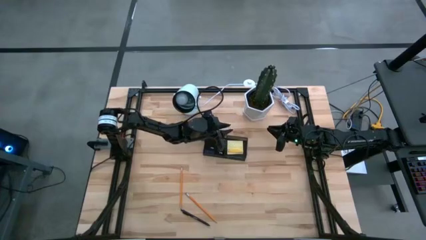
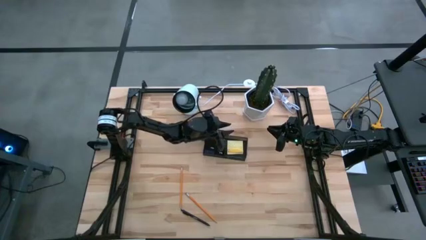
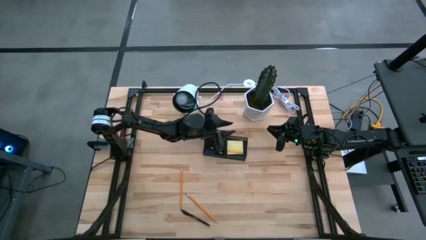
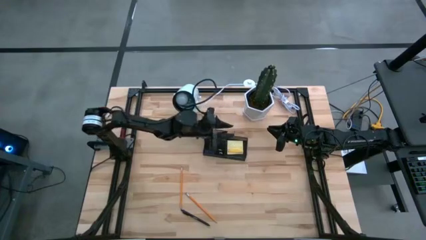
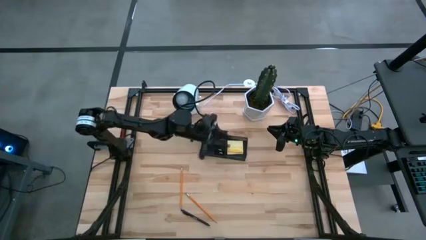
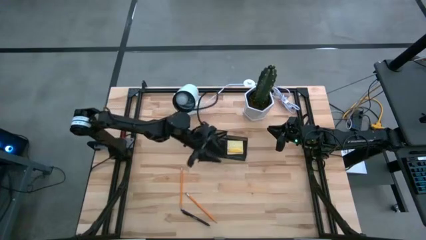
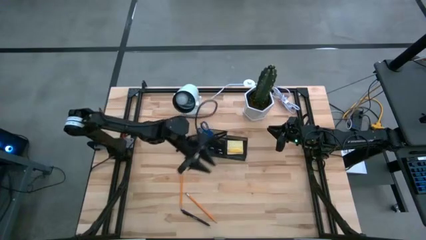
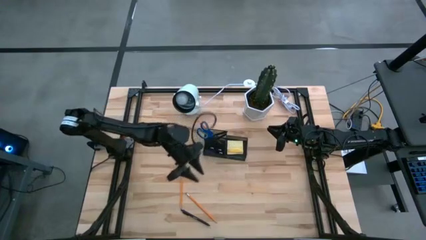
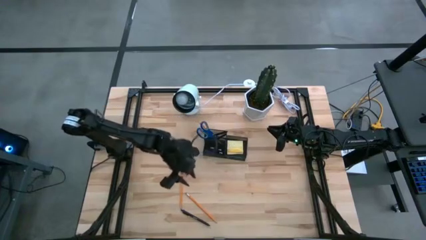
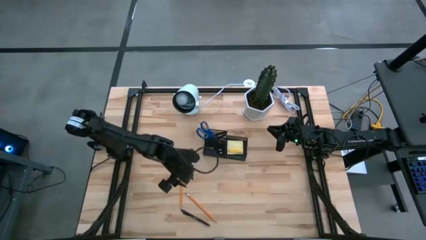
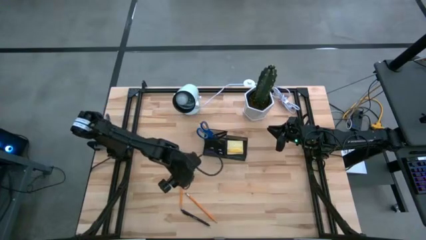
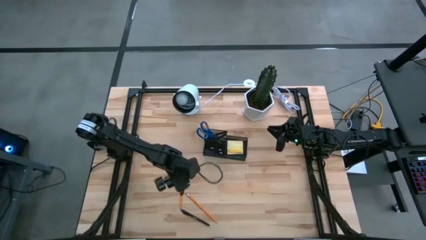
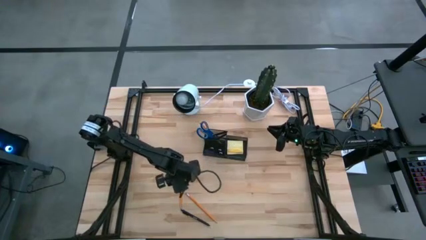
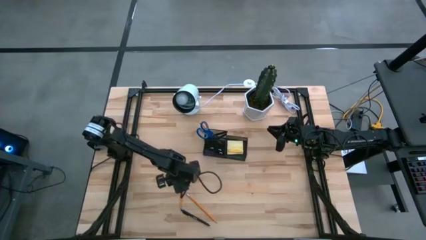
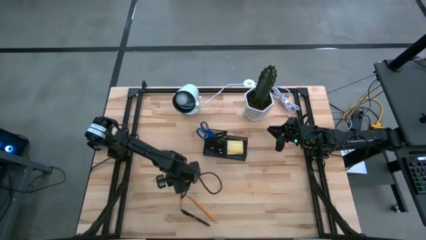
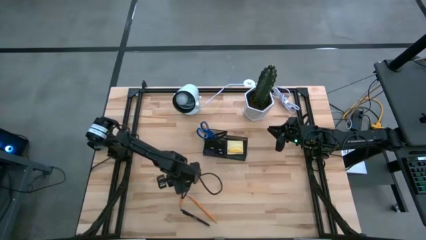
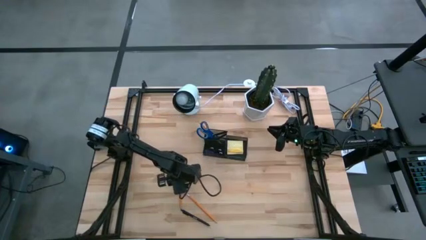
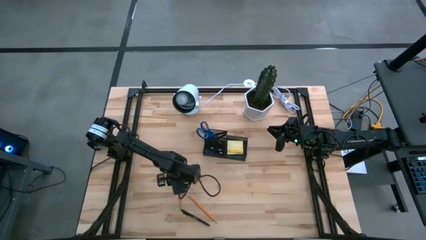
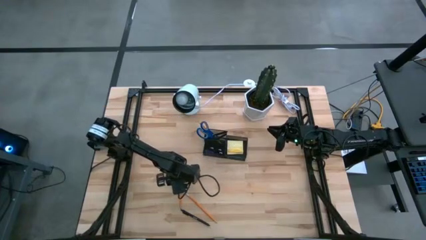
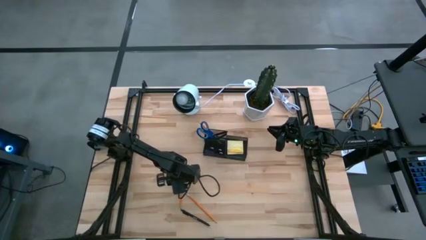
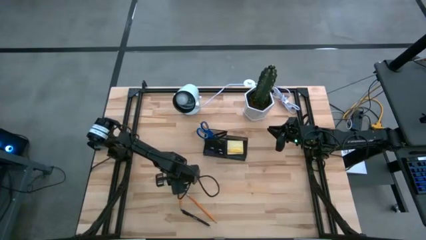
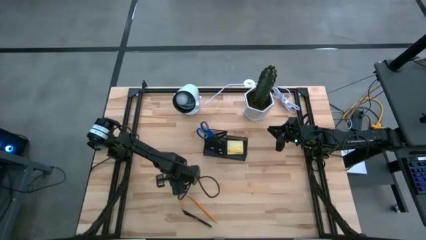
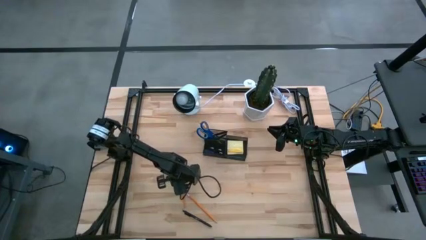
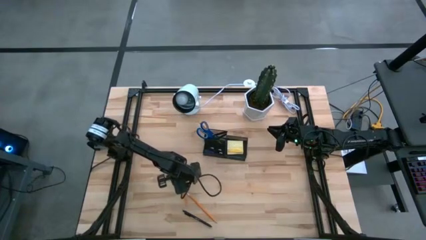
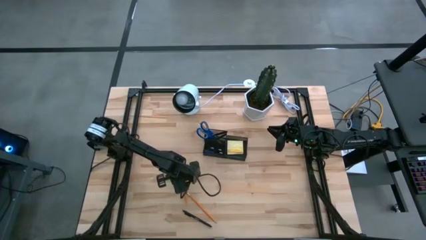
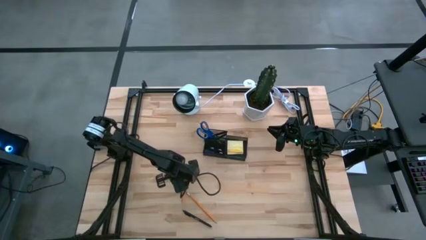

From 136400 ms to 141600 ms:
Task: Pick and place office supplies into organizer
Put the left yellow pencil into the black desk organizer

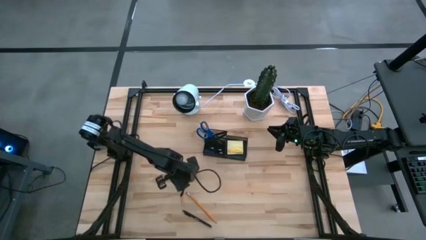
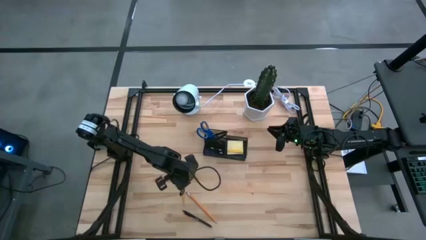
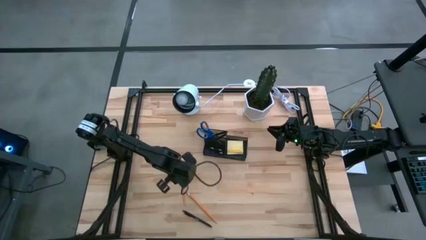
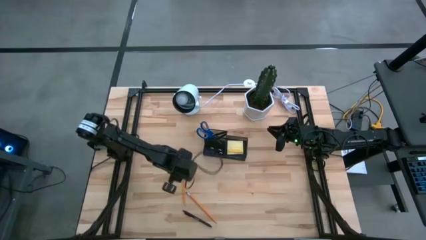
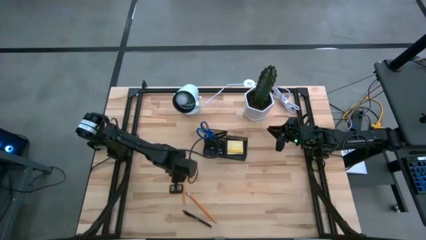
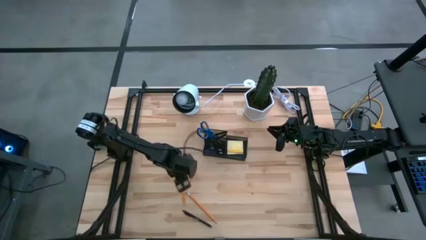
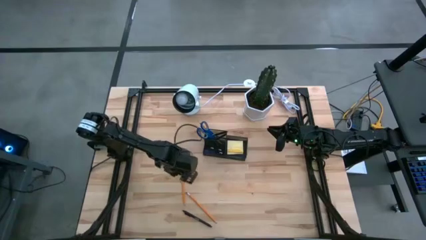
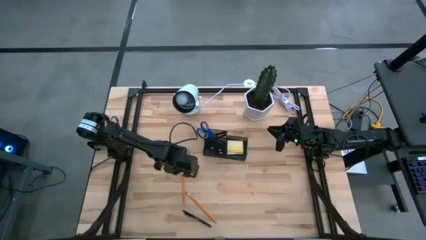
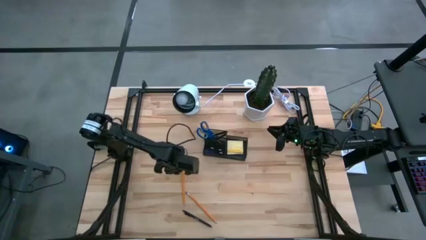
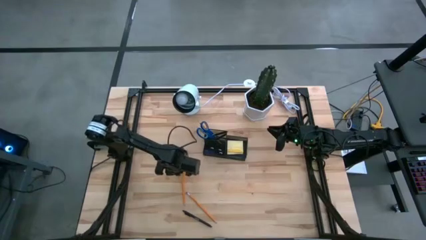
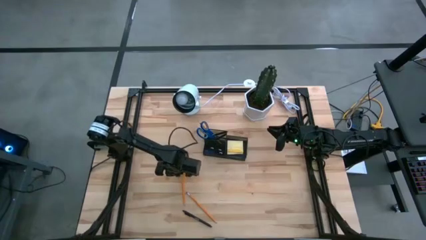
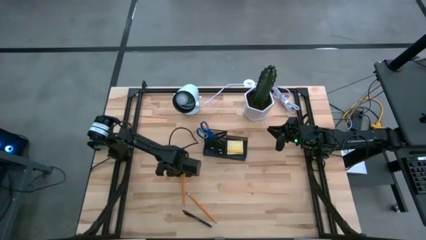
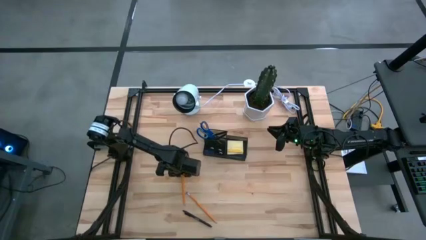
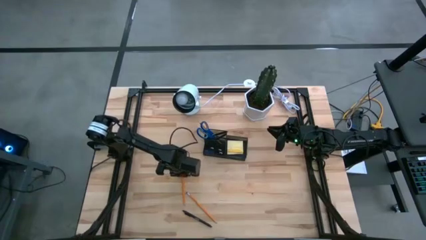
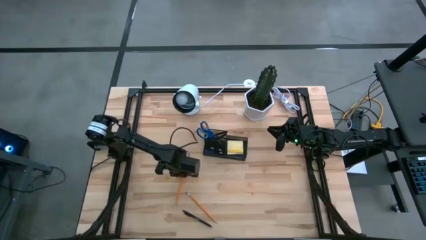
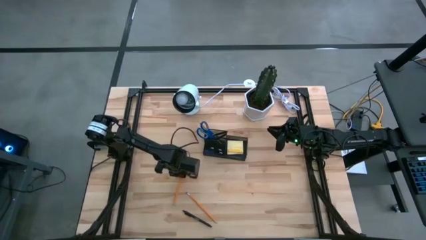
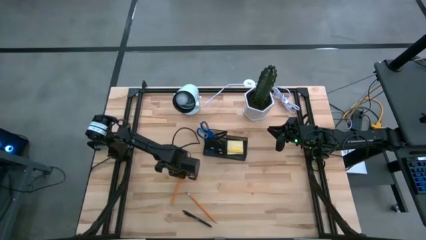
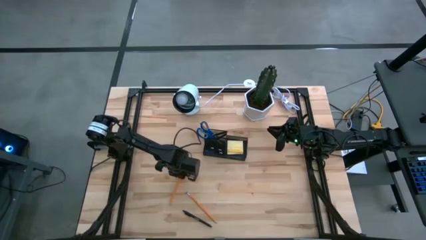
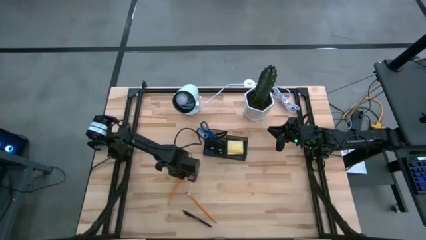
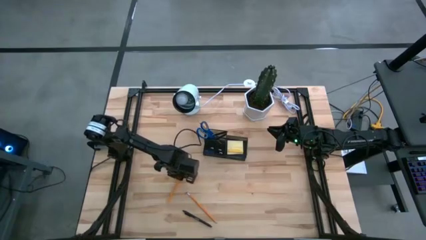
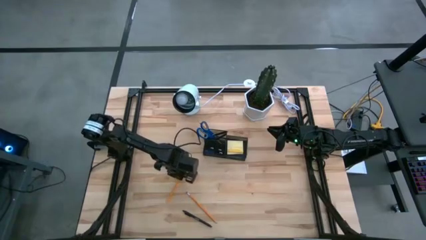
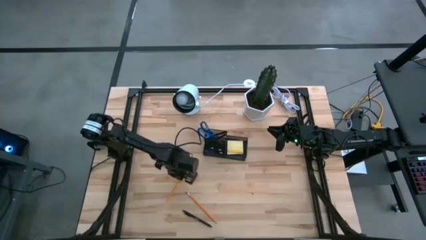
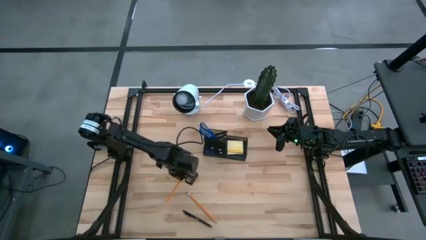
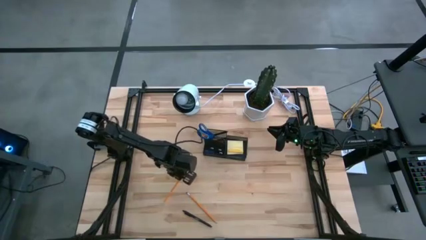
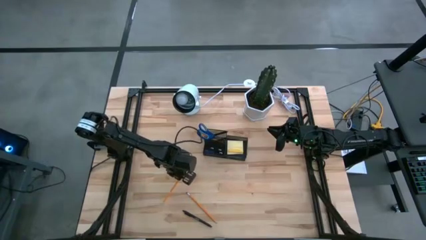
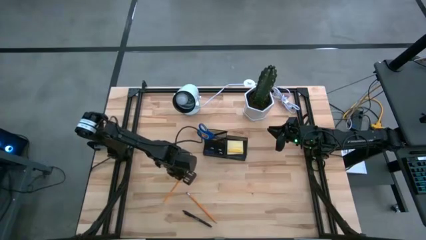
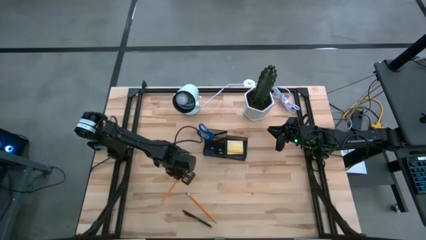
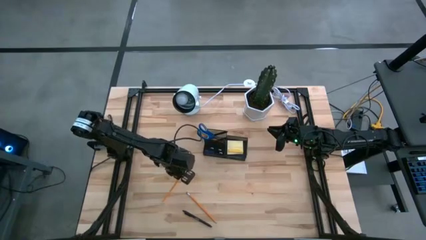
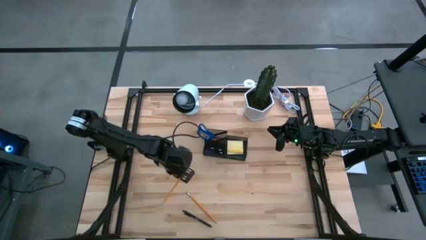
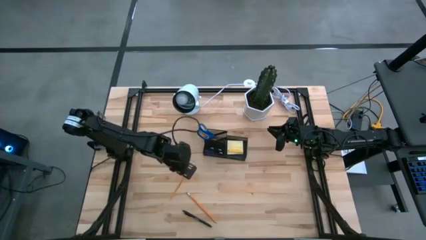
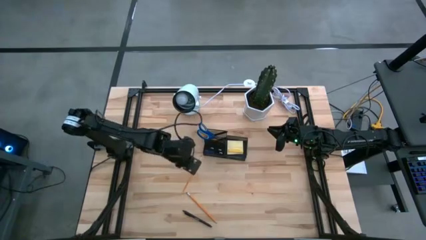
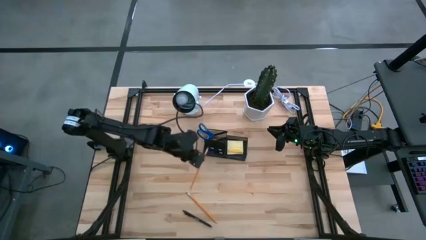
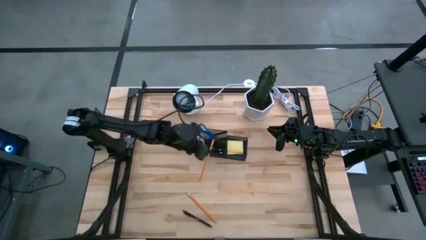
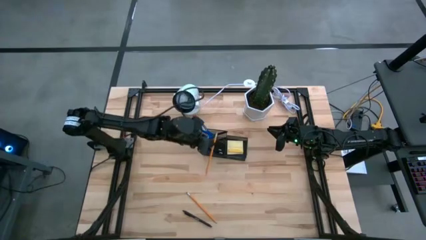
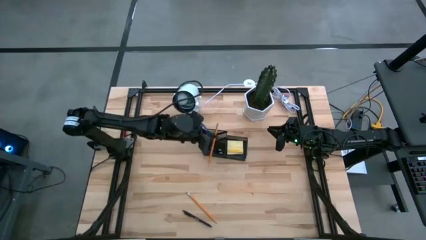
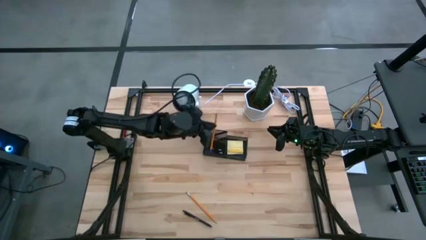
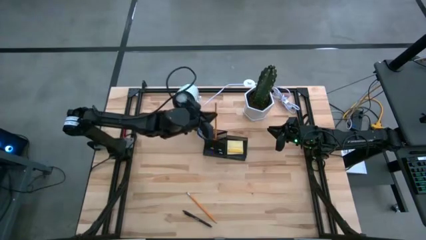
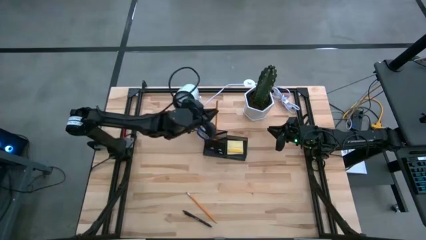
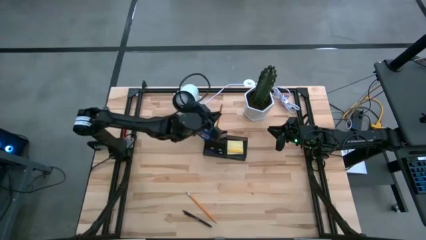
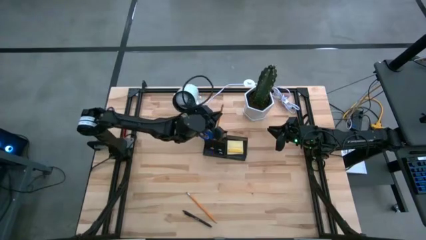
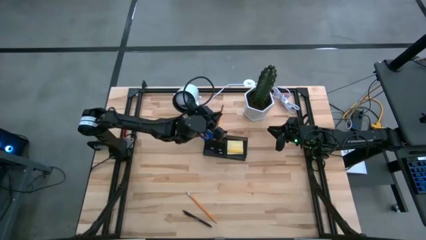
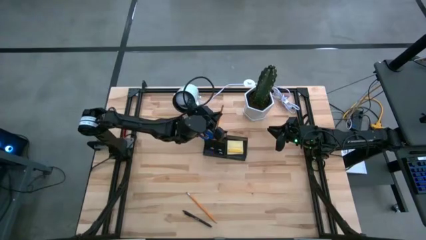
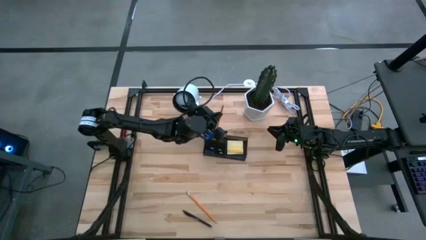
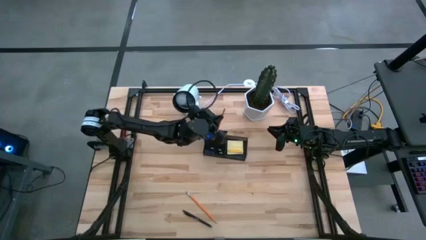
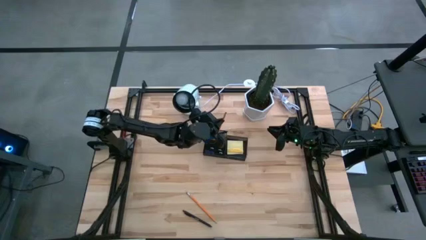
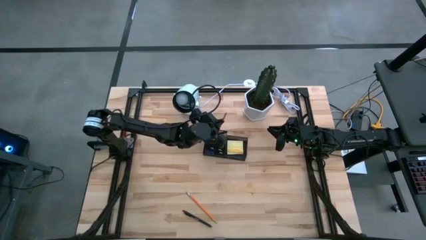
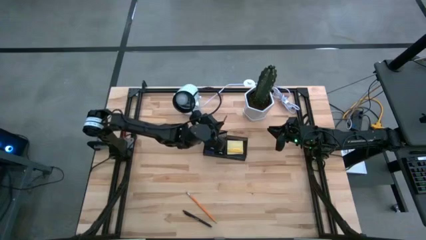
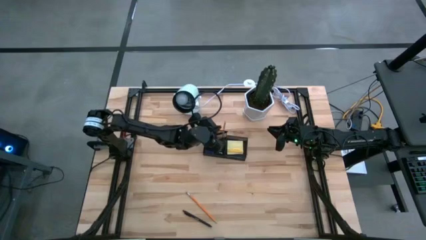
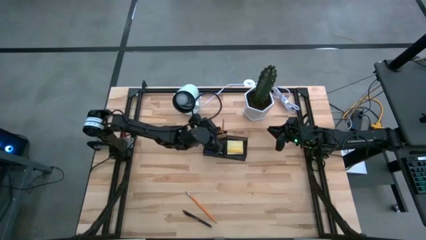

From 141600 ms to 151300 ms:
Put the left yellow pencil into the black desk organizer
